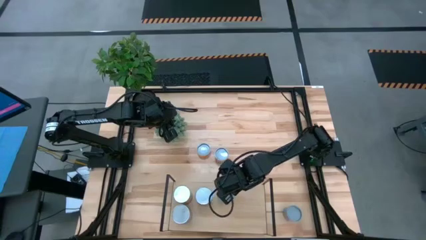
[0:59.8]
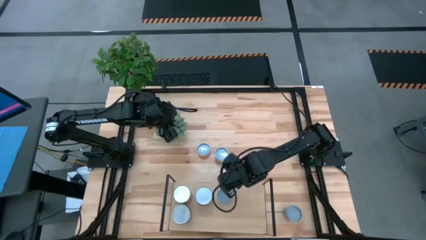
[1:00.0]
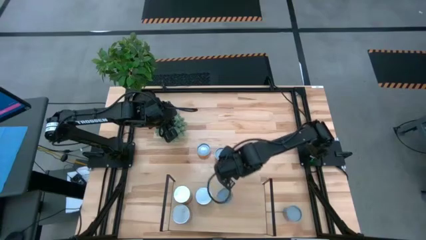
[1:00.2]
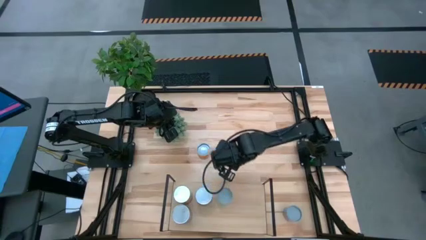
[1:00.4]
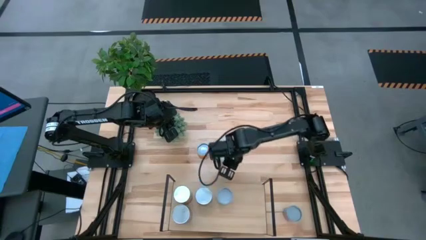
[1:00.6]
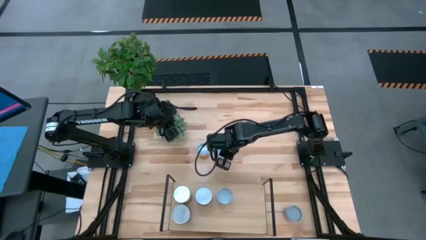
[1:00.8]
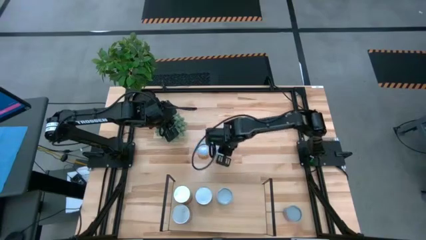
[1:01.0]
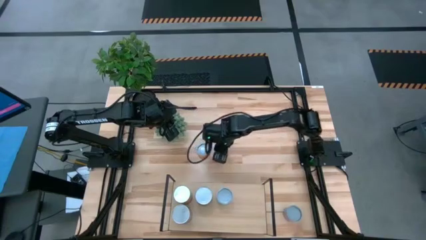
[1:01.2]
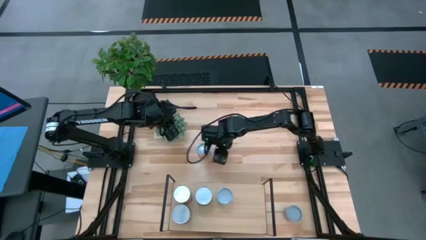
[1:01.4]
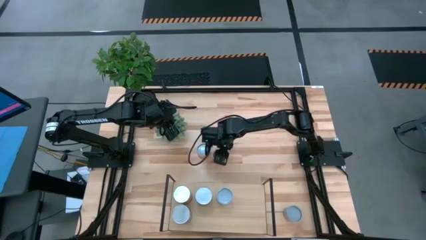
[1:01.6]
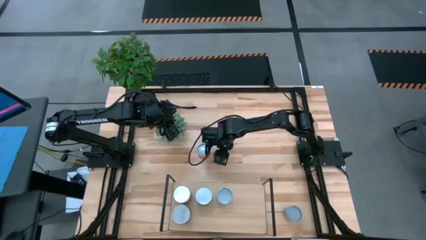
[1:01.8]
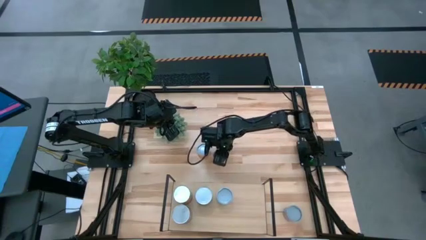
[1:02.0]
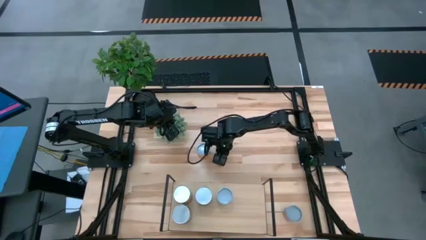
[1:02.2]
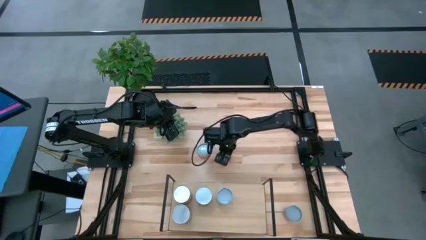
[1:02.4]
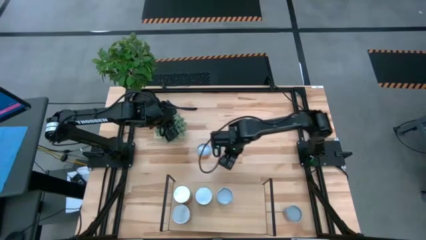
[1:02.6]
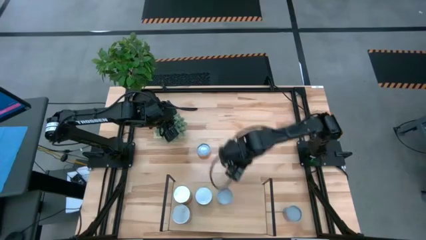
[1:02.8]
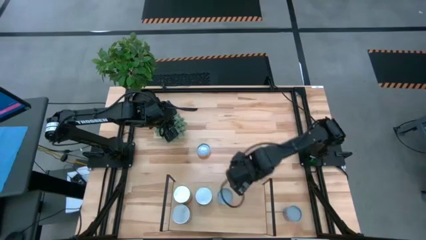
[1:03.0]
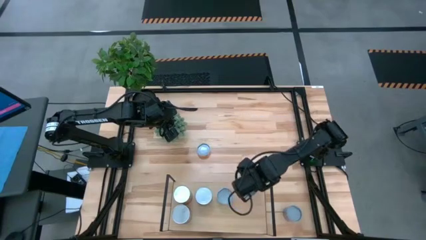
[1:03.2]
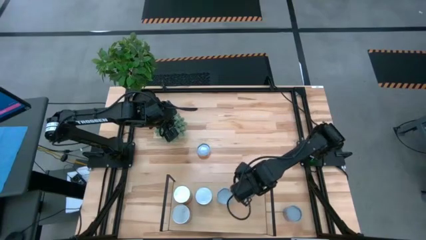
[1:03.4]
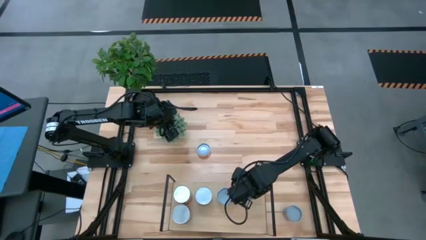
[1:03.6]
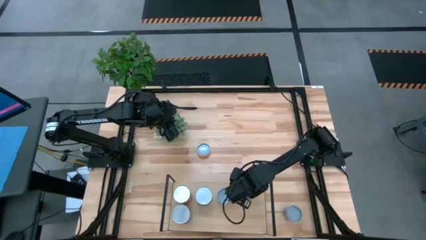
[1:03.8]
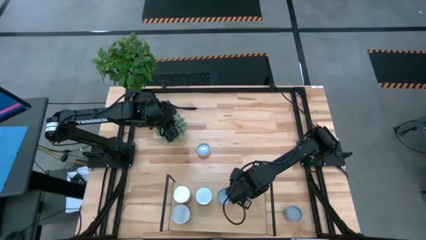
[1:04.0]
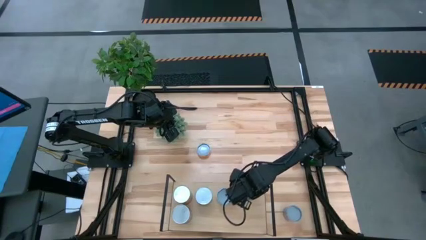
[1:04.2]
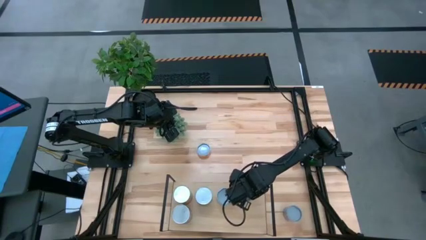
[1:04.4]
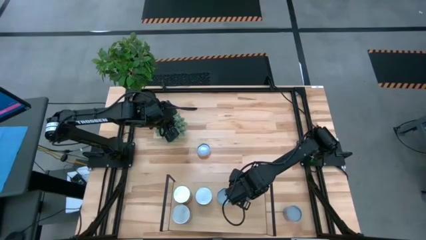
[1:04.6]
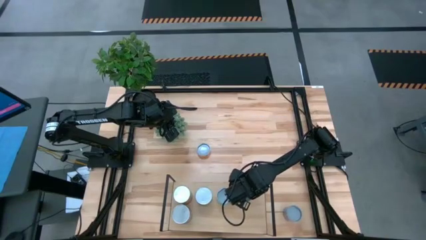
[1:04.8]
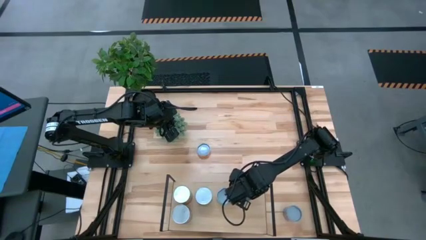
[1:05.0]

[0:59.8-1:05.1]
Task: Pick and place cans onto a shelf
Put the canned black beans on the shelf

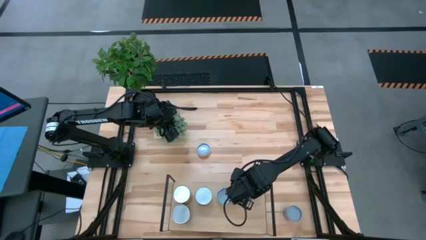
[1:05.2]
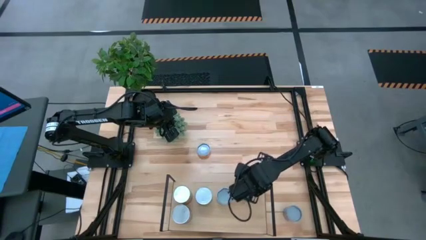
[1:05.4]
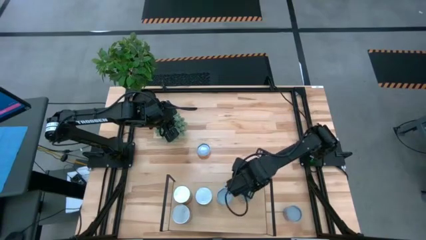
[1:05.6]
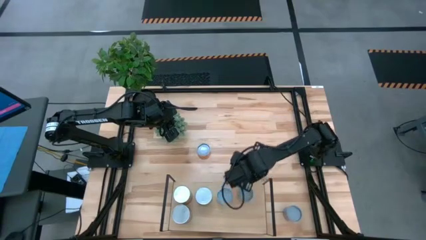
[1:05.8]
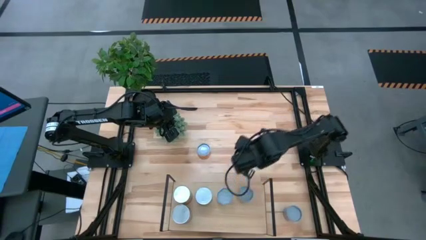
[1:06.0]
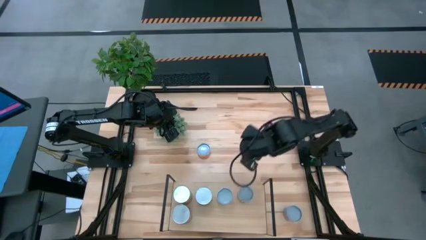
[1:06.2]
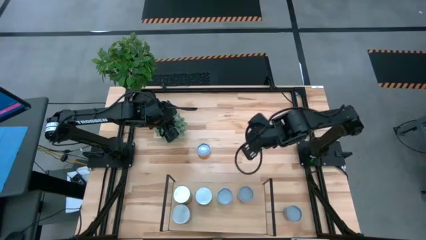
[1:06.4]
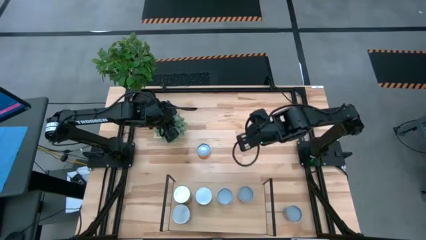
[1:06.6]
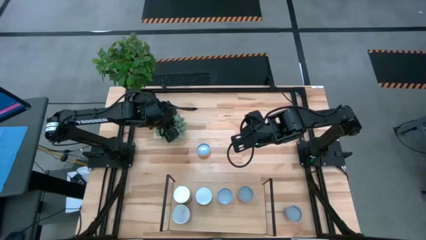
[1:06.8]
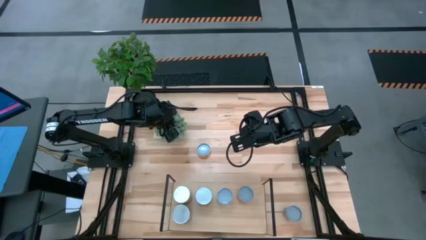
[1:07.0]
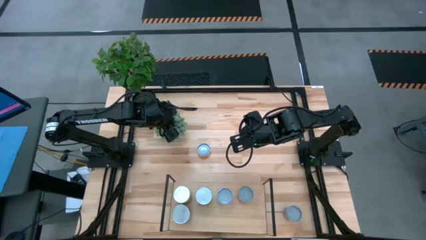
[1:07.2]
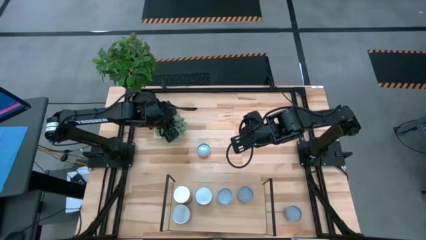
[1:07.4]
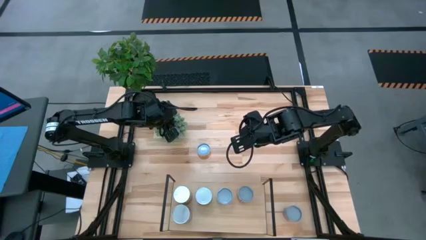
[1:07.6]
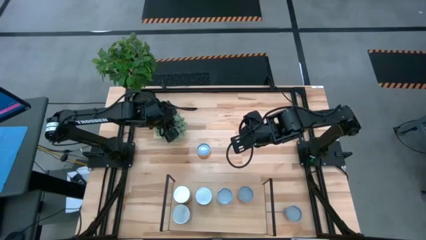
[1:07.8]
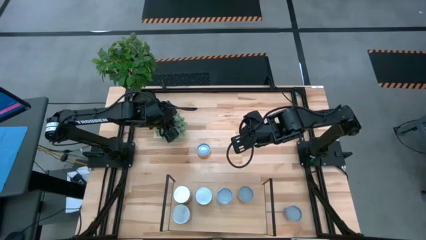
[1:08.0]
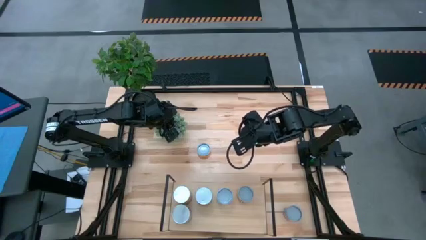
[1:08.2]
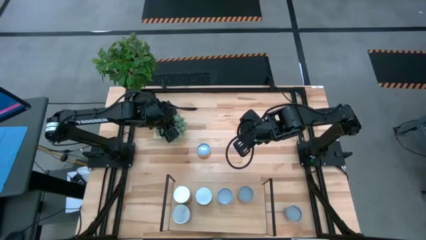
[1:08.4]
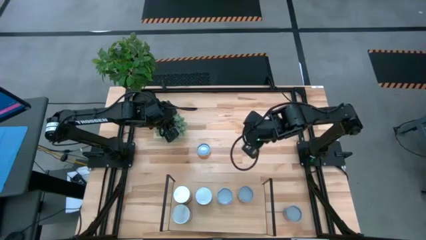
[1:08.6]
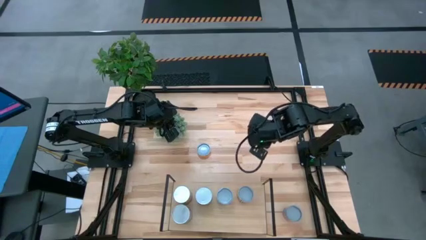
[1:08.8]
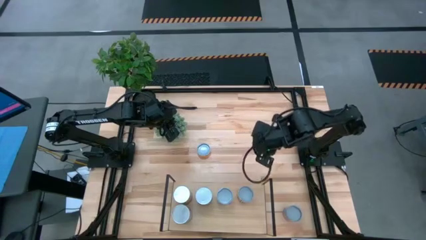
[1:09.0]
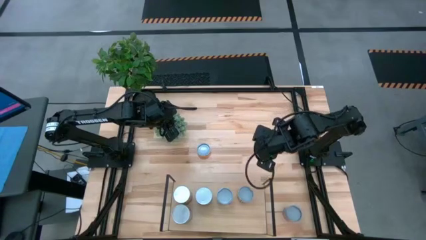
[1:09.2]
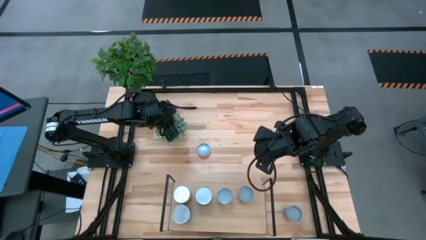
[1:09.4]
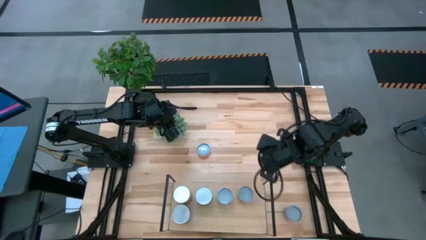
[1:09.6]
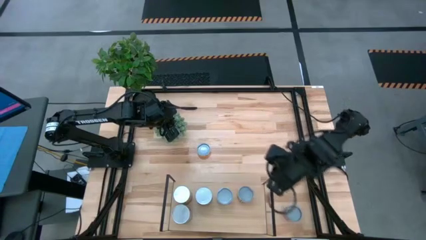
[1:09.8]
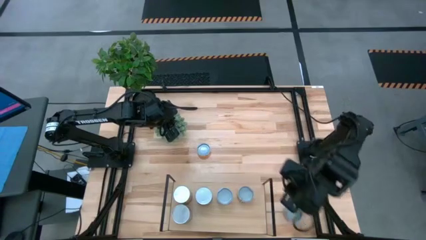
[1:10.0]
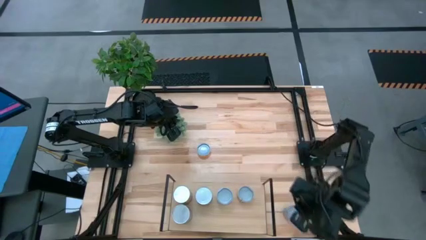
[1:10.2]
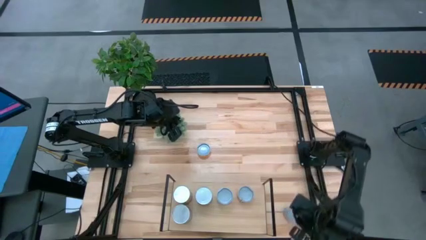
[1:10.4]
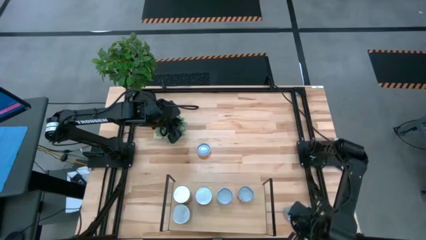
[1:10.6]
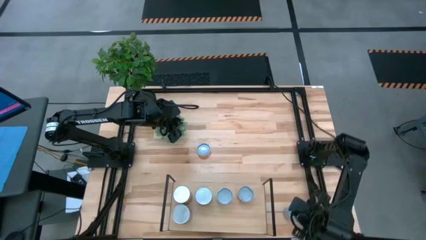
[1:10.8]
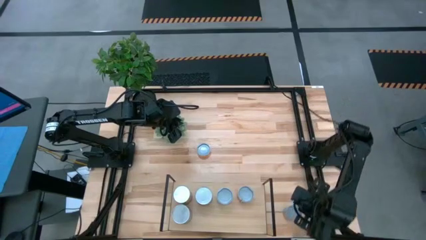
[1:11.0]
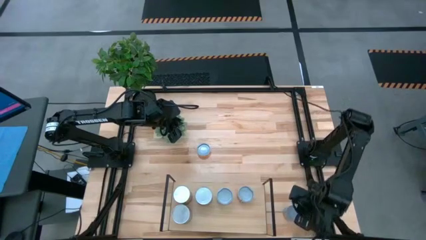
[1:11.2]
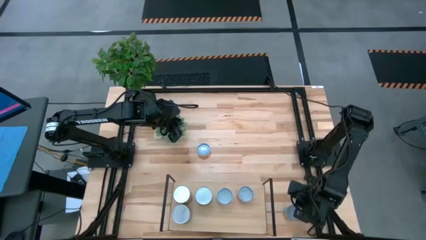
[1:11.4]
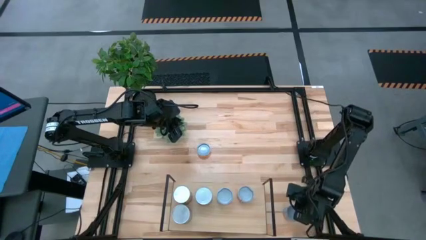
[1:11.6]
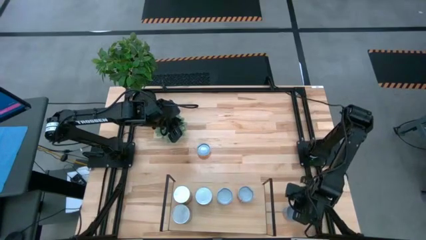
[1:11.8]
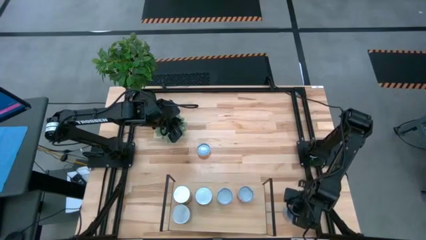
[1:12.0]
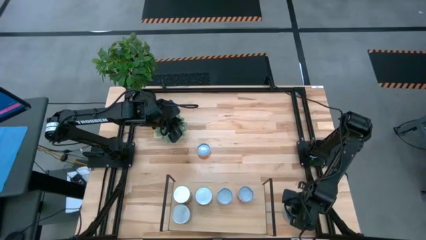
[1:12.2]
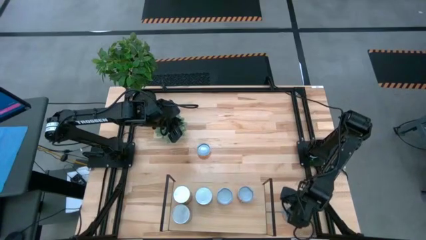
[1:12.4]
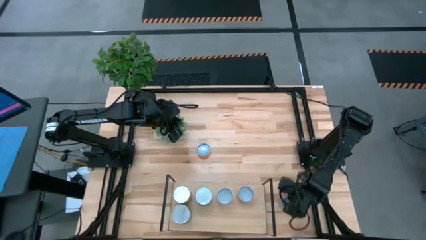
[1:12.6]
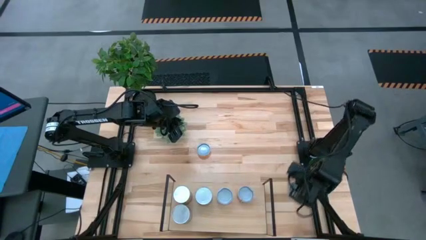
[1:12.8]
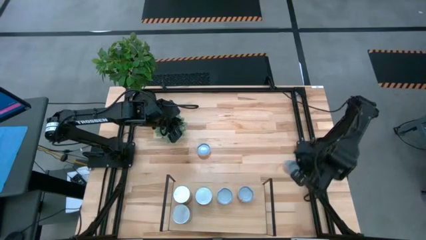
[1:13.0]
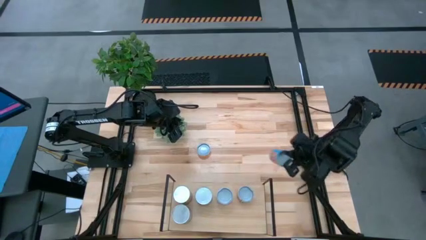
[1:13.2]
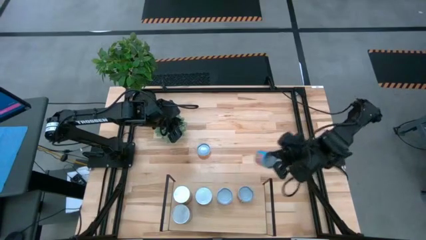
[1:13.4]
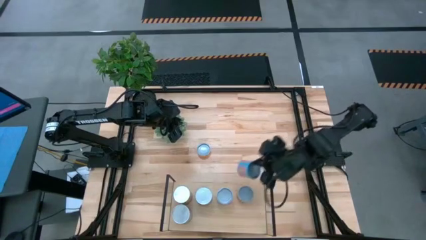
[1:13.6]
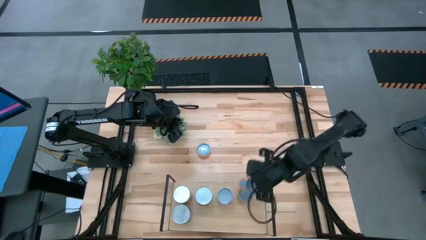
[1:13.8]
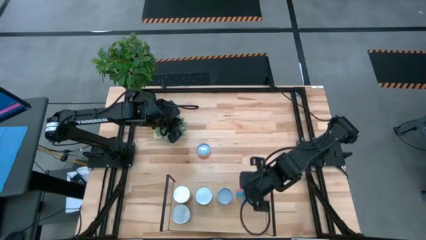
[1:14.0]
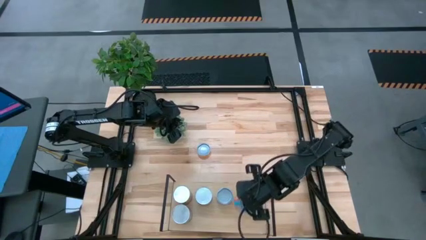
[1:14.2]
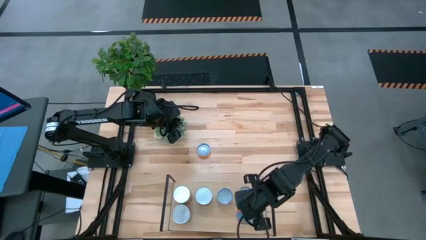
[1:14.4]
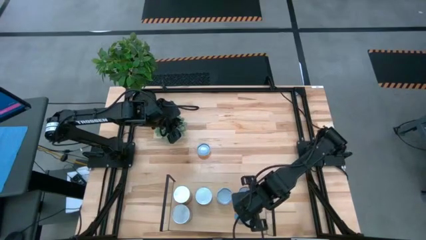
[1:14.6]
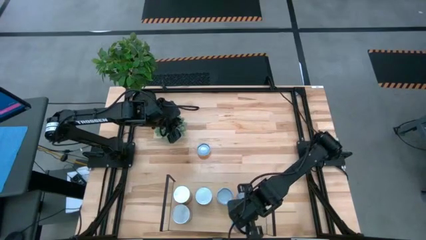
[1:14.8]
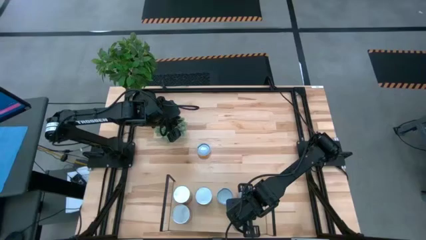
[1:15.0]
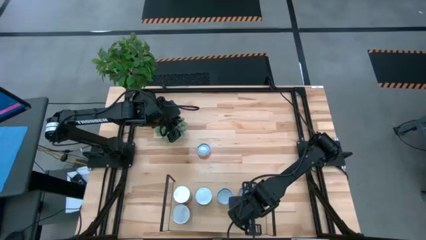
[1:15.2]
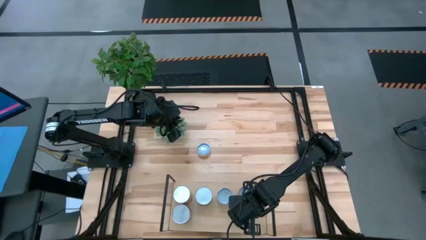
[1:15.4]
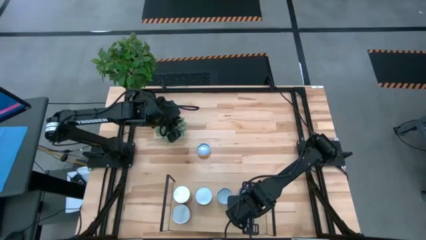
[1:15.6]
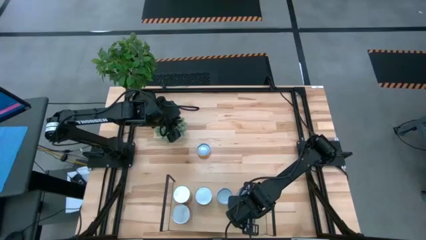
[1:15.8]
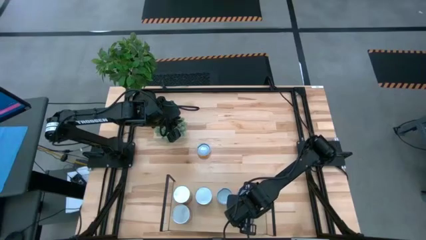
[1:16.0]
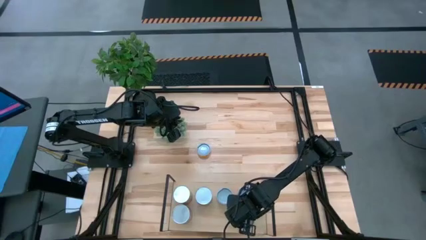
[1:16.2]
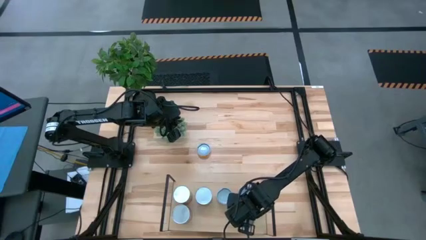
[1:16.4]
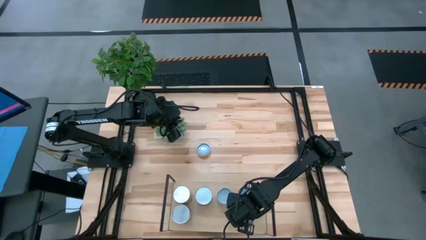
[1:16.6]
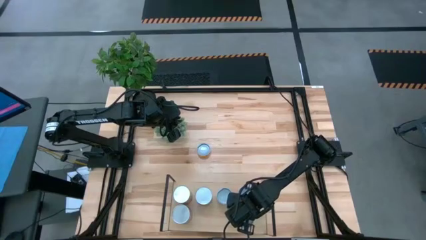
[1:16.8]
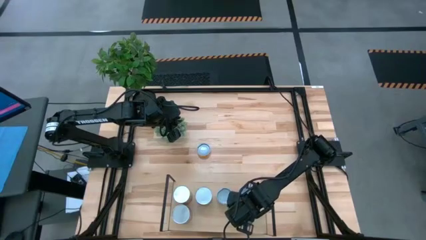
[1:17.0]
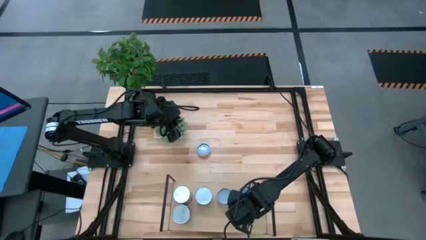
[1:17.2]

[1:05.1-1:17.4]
Put the blue can on the shelf
